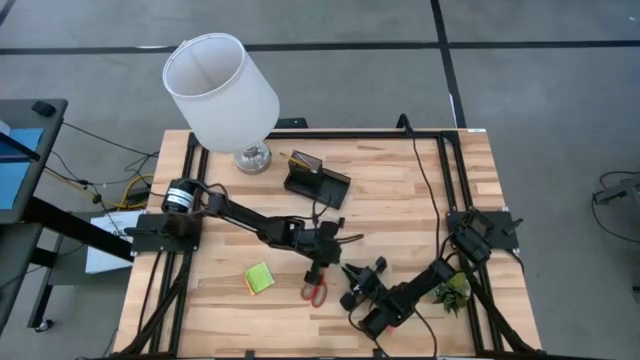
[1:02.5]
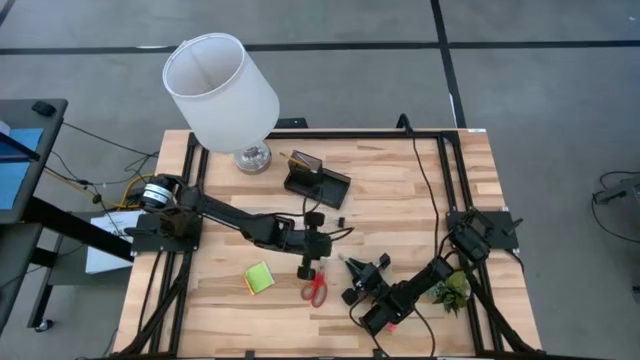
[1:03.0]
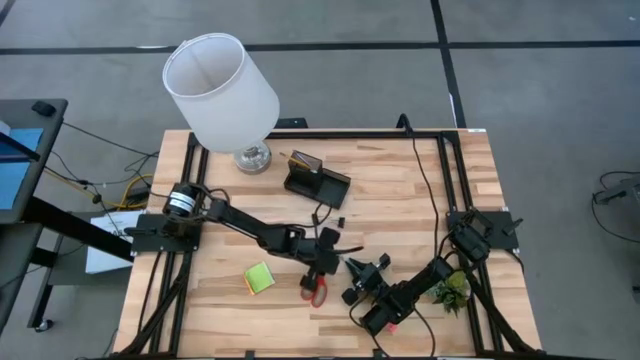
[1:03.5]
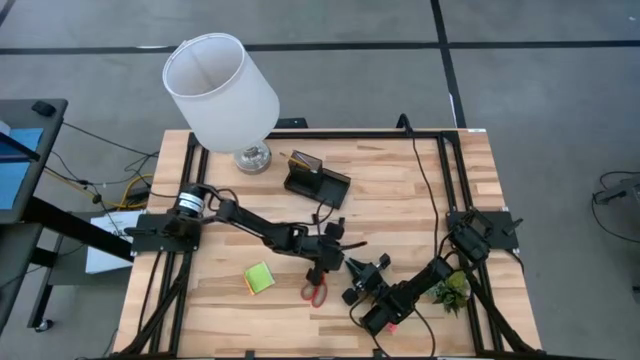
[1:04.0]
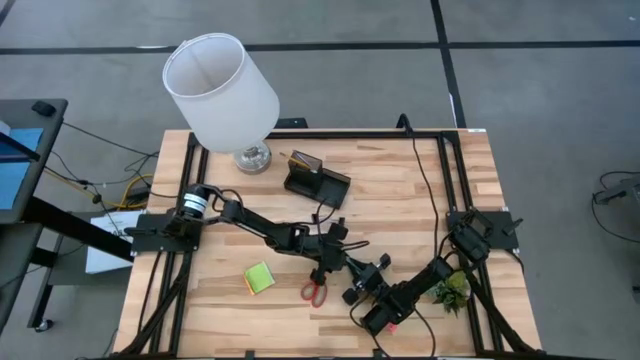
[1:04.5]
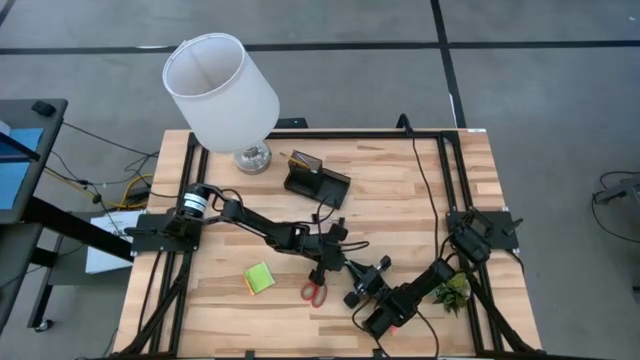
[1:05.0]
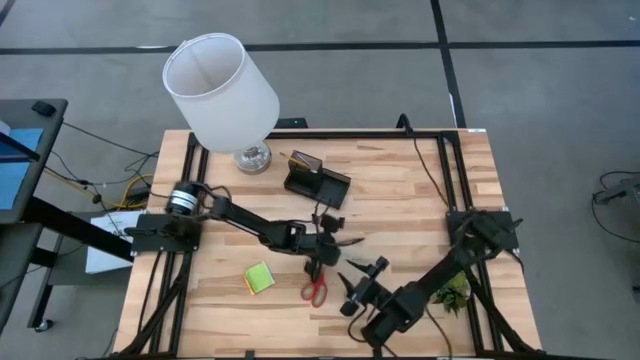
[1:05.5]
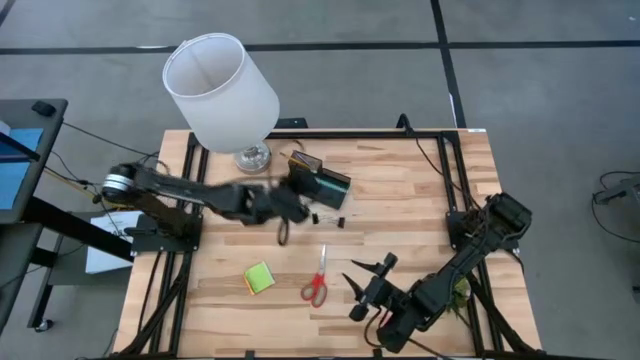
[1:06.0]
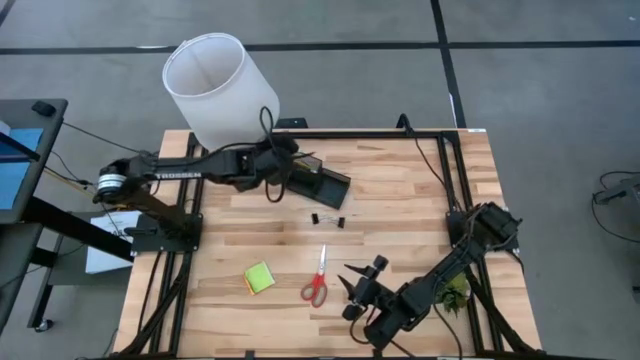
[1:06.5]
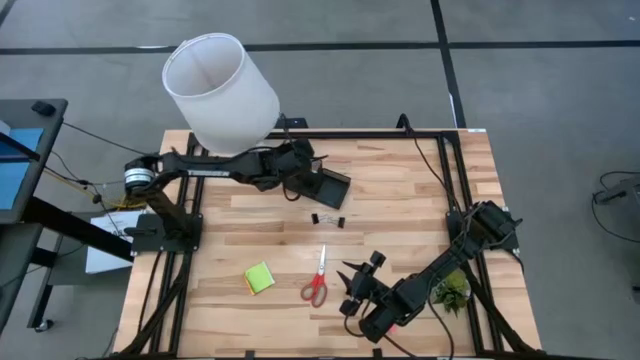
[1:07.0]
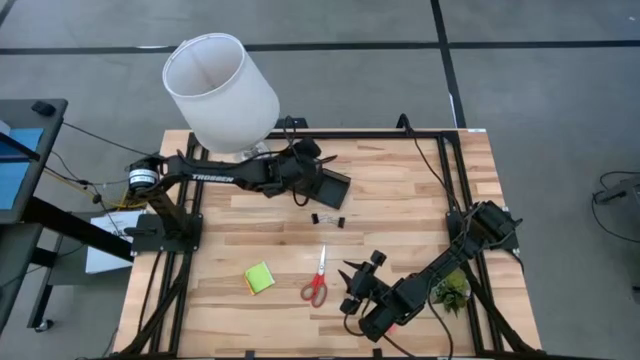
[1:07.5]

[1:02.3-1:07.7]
Task: Pick and place office supplies into organizer
Put the light blue pencil into the black desk organizer

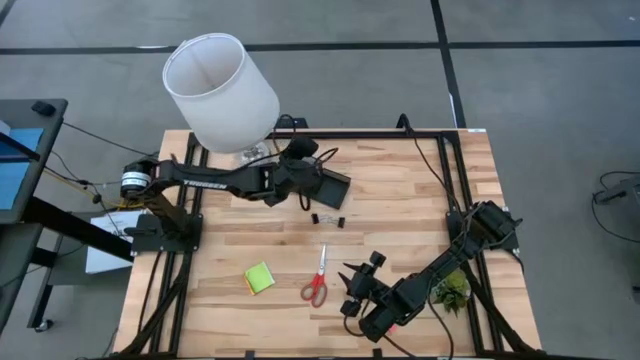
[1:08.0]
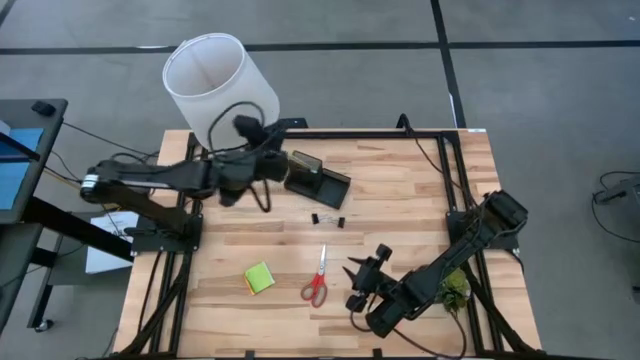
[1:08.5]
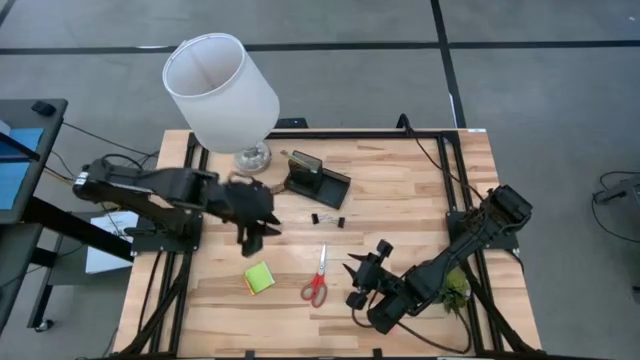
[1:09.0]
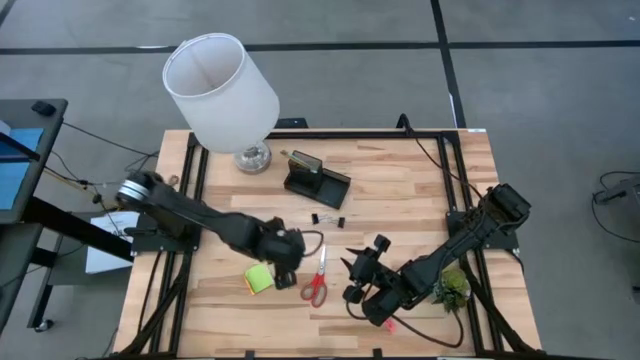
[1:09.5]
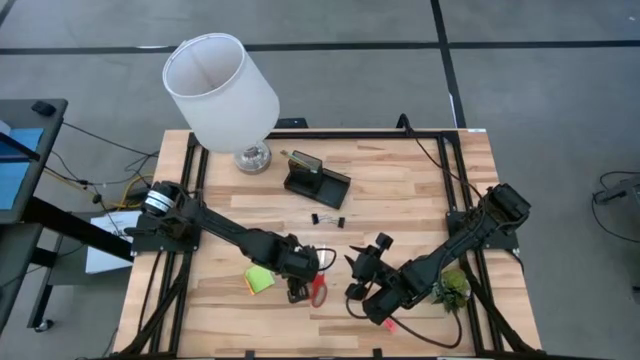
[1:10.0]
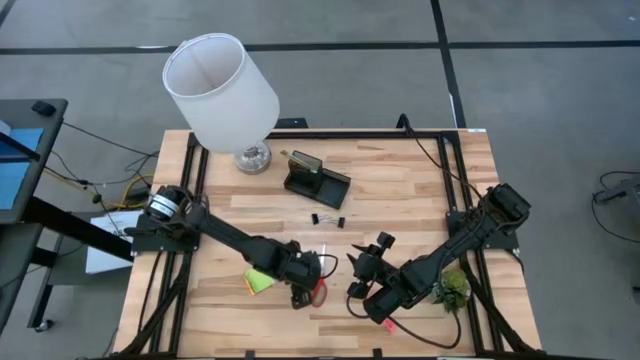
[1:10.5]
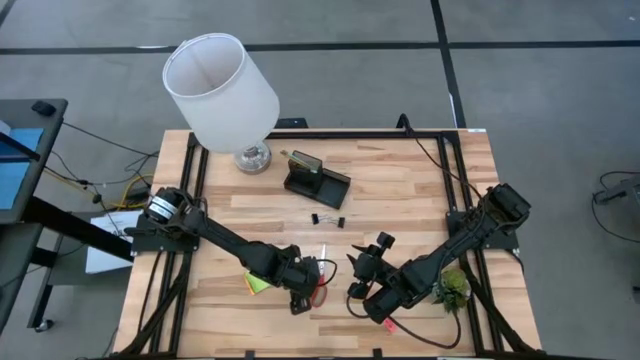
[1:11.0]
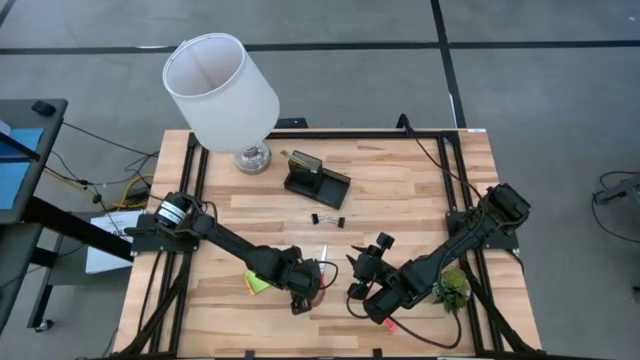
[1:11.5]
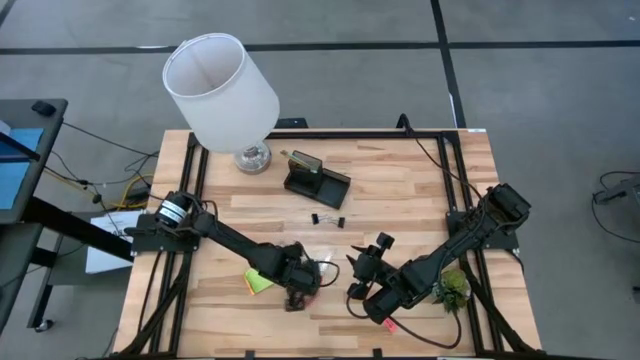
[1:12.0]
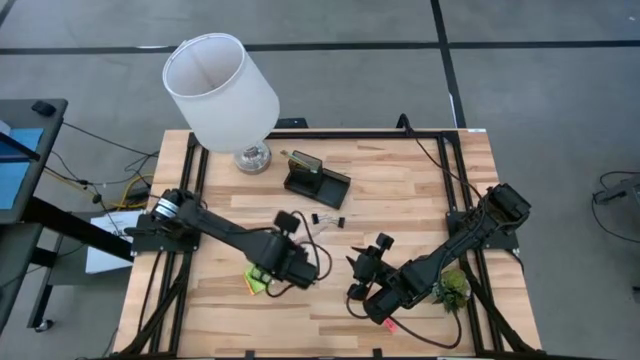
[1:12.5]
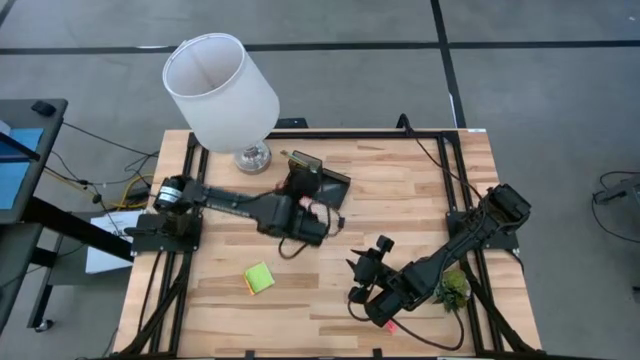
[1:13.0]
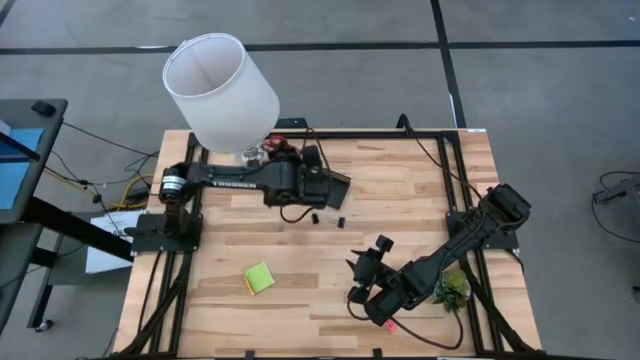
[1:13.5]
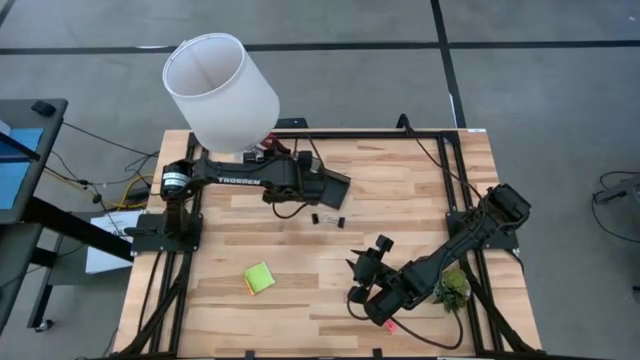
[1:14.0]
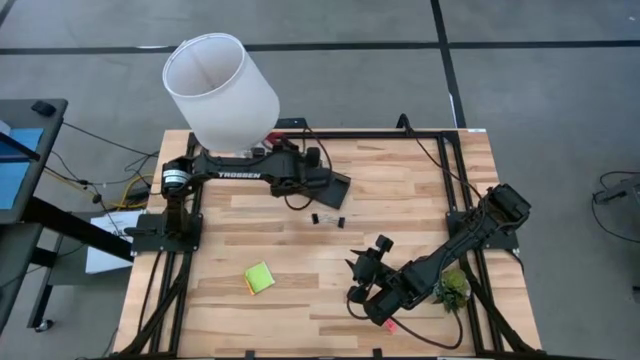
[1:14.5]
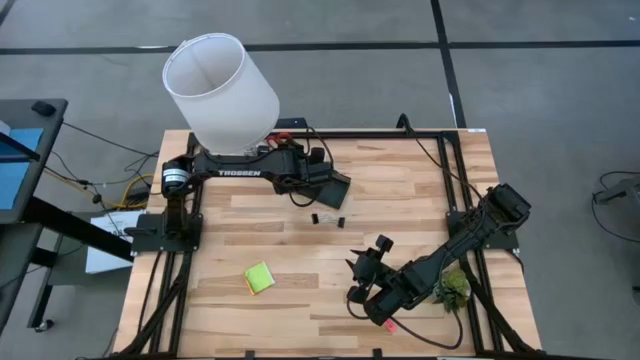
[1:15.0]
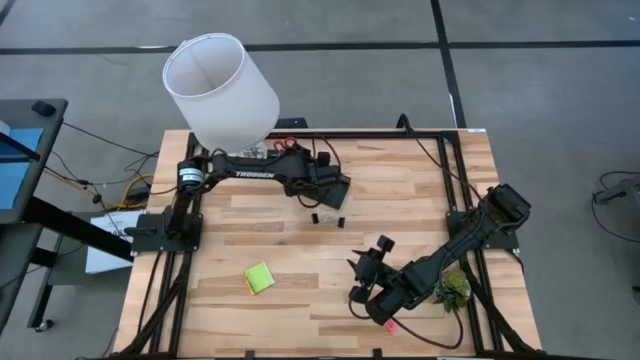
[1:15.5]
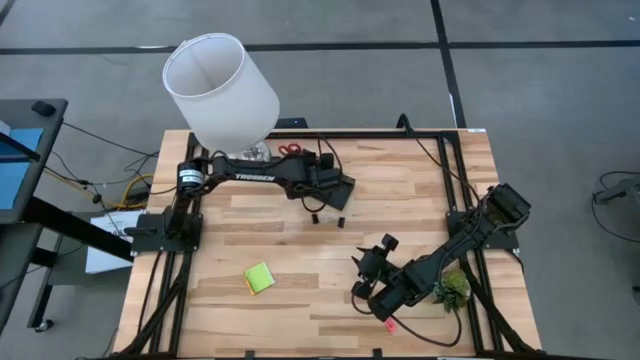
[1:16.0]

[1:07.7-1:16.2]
Put the red scissors into the black desk organizer

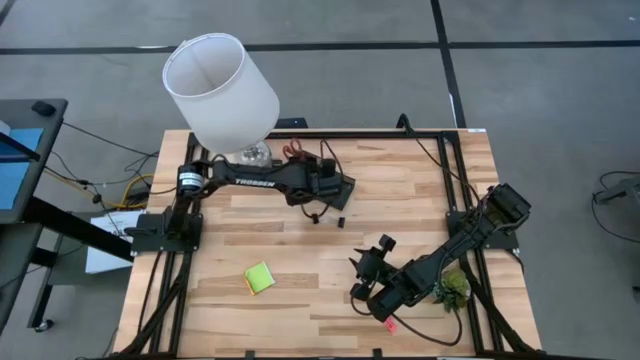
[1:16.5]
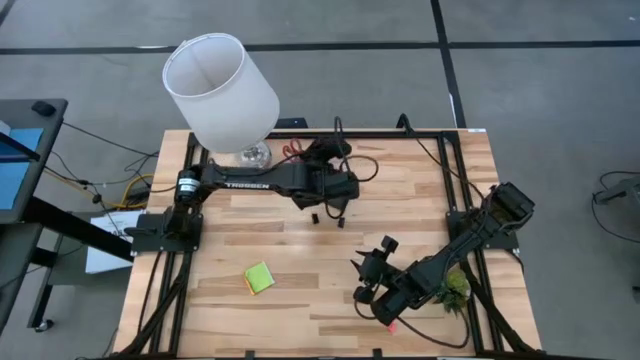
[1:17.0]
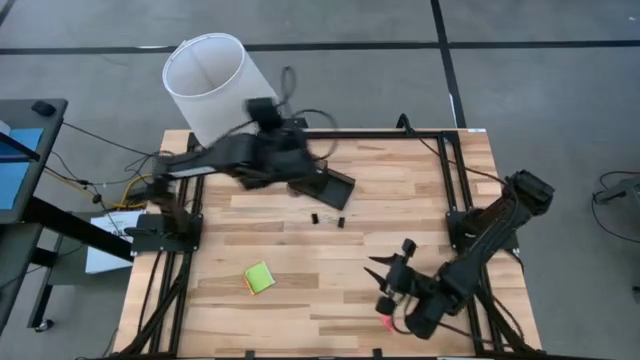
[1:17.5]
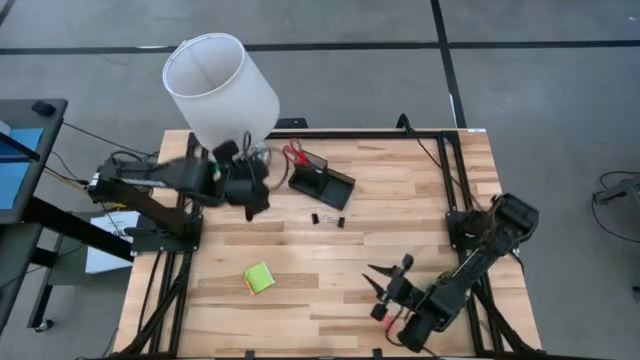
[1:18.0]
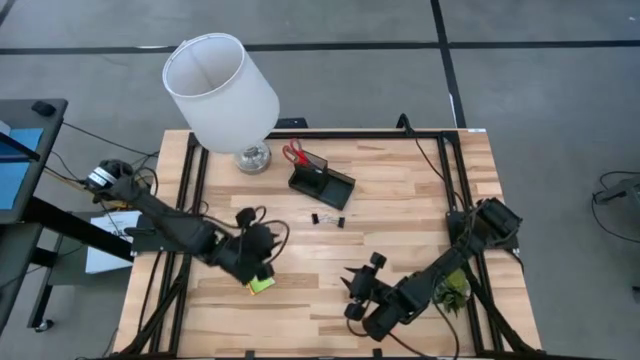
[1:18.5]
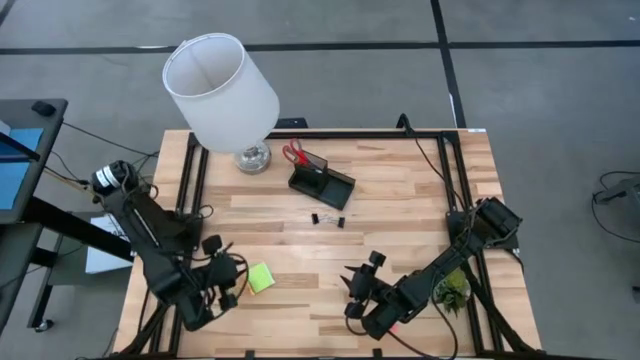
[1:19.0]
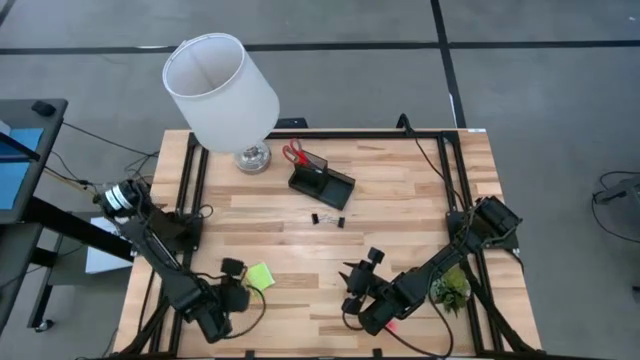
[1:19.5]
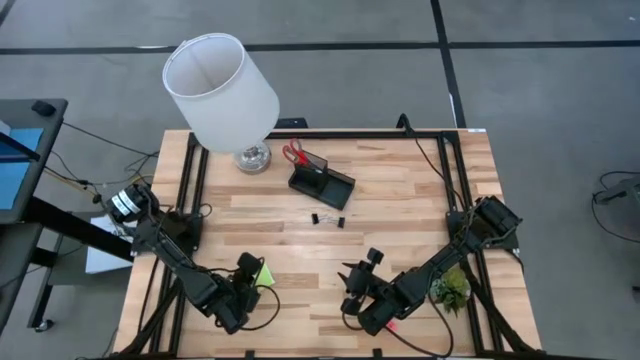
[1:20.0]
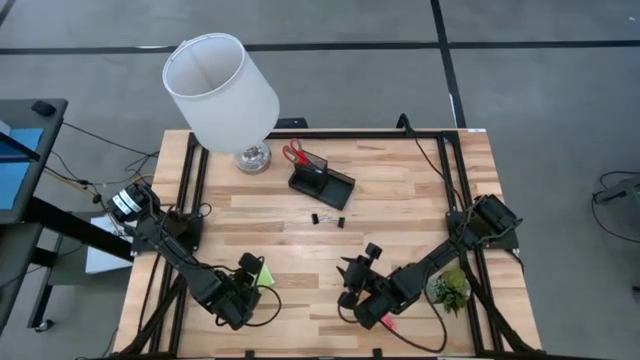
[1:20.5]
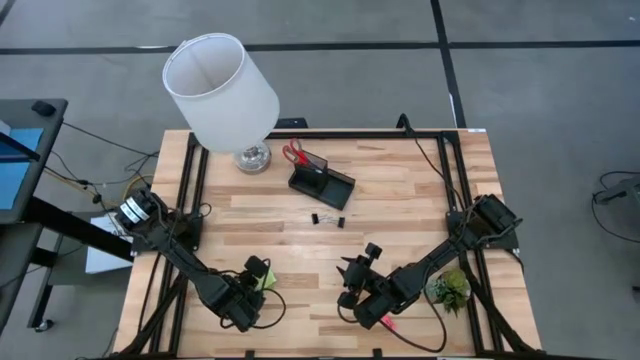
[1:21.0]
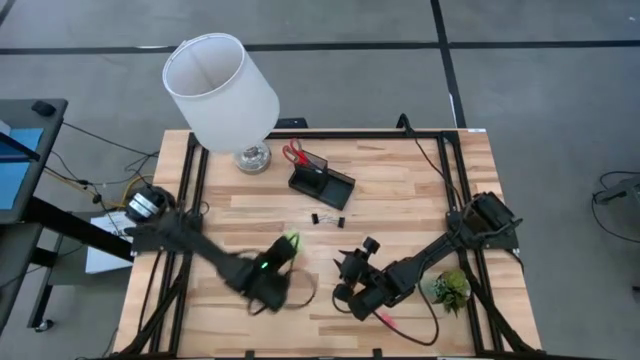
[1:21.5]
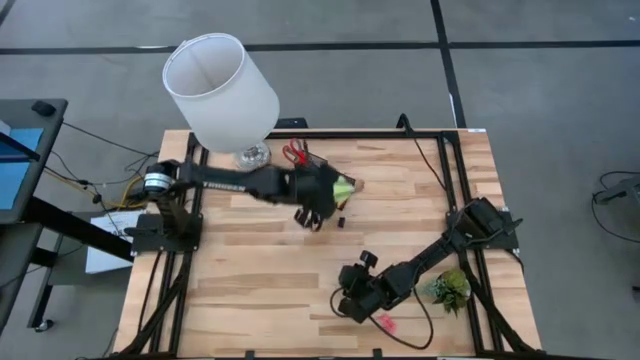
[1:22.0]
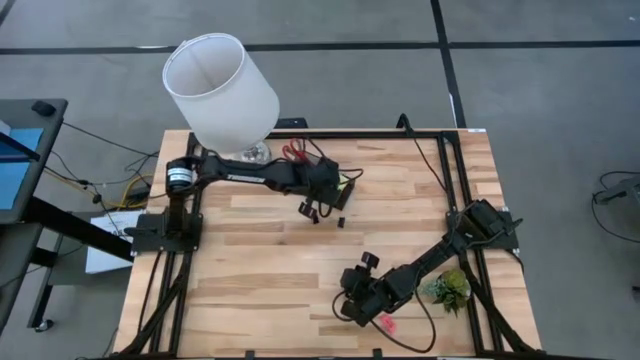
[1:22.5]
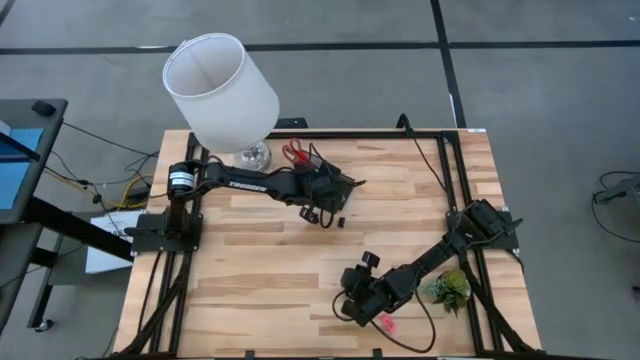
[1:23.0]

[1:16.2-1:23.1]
Put the green sticky notes into the black desk organizer

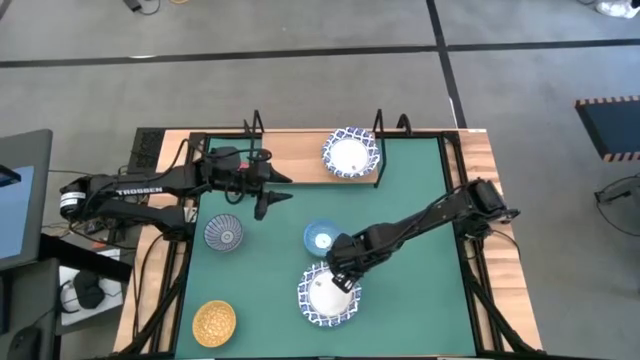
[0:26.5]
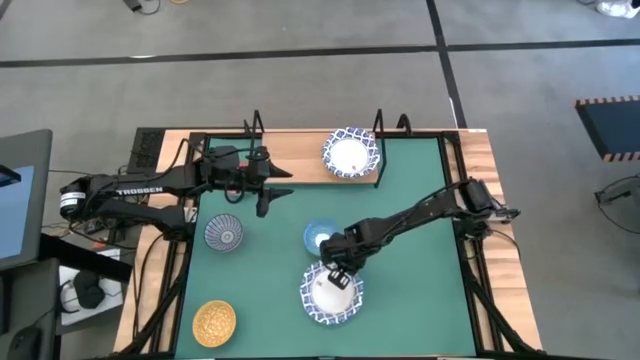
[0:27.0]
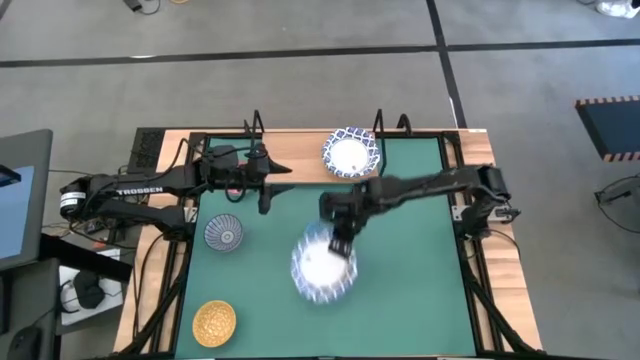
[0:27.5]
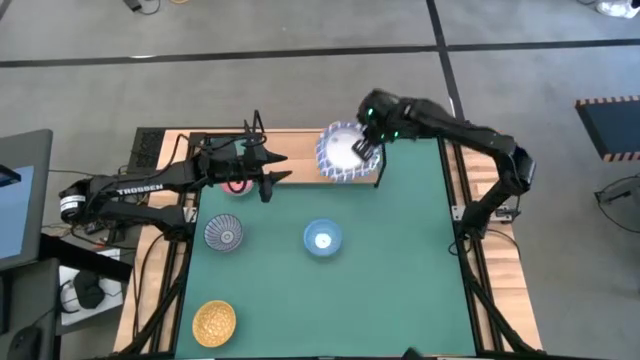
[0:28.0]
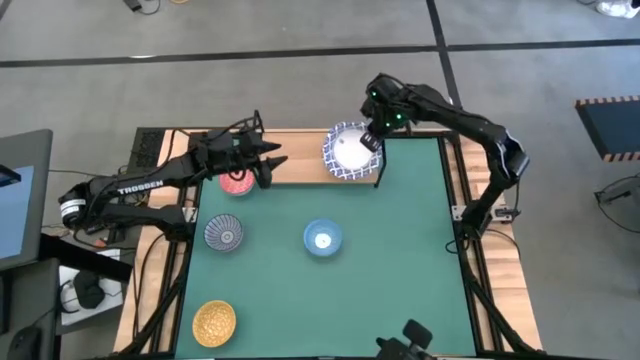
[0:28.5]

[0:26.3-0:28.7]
Task: Place and stack bowls onto a shelf
Stack the white patterned bowl on top of the other white patterned bowl on the shelf
